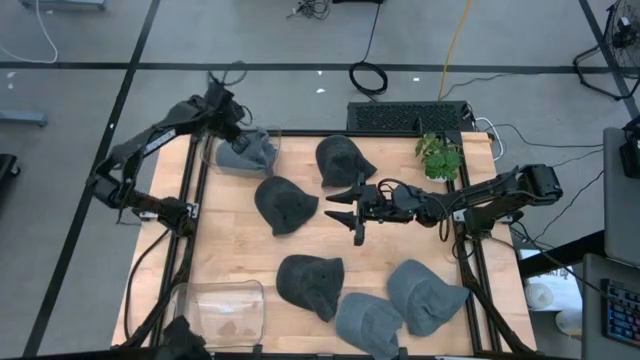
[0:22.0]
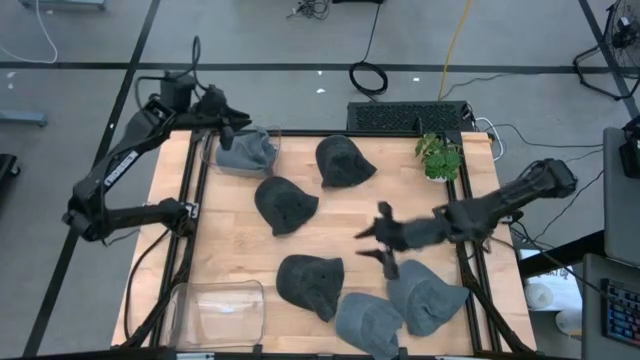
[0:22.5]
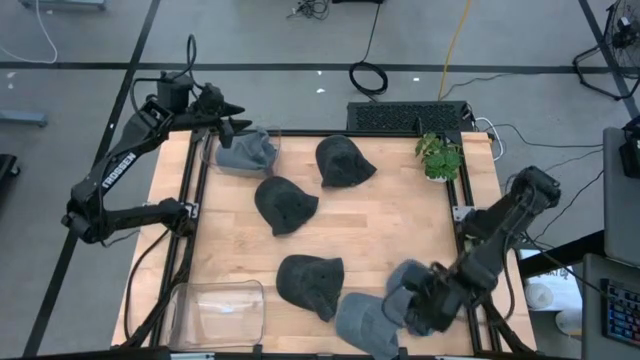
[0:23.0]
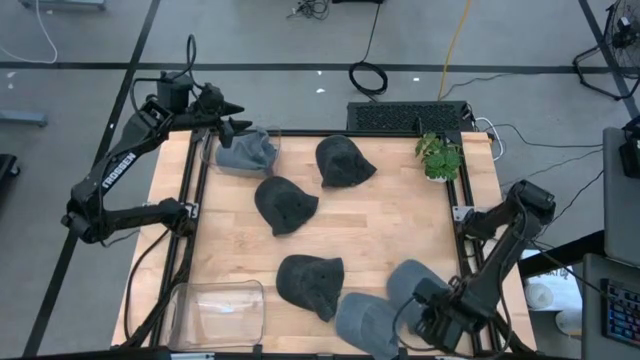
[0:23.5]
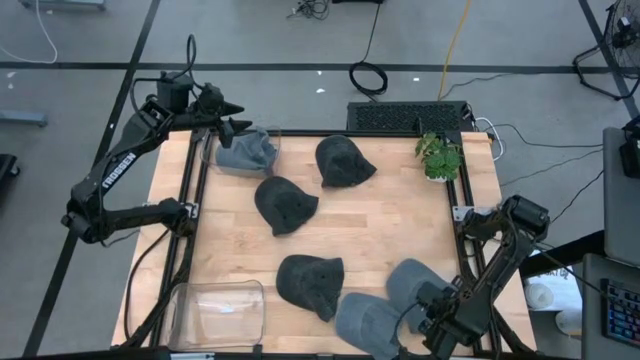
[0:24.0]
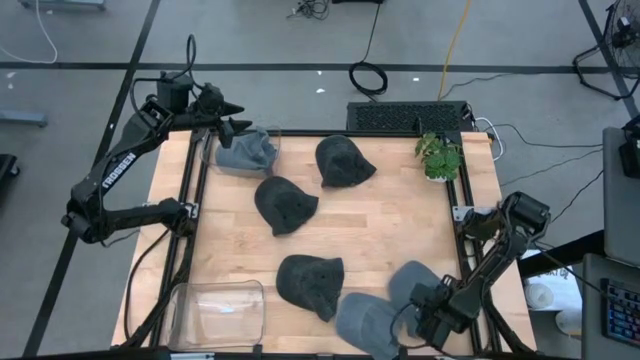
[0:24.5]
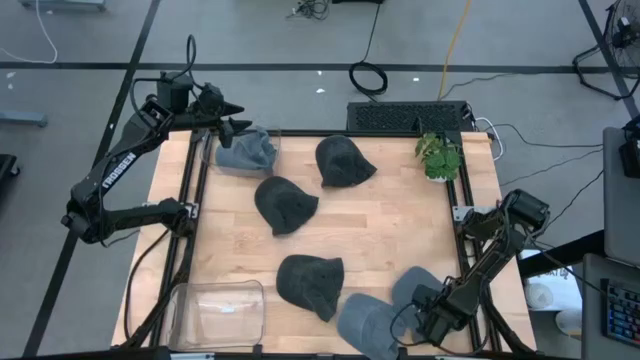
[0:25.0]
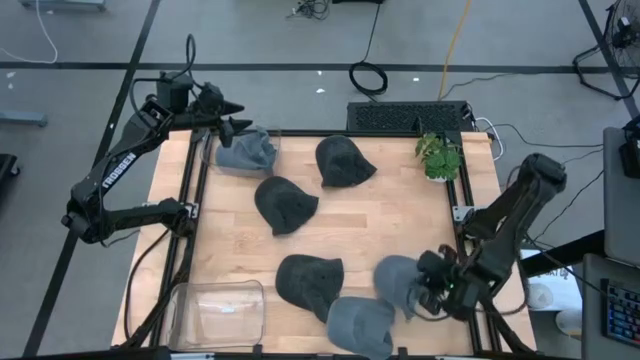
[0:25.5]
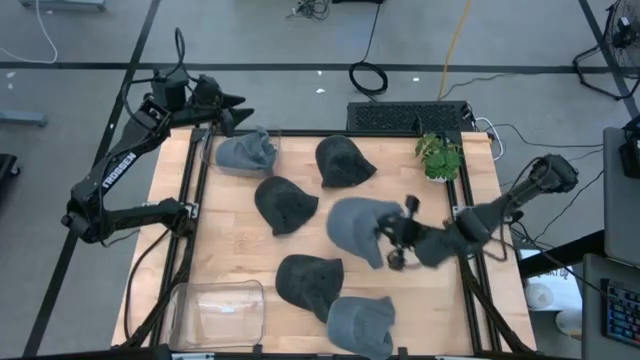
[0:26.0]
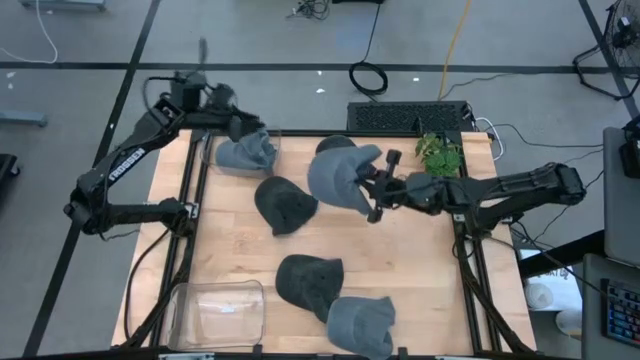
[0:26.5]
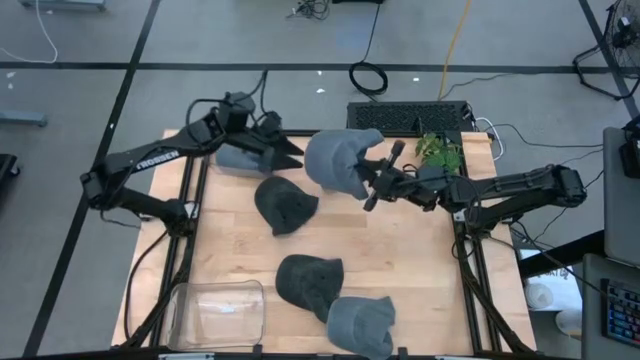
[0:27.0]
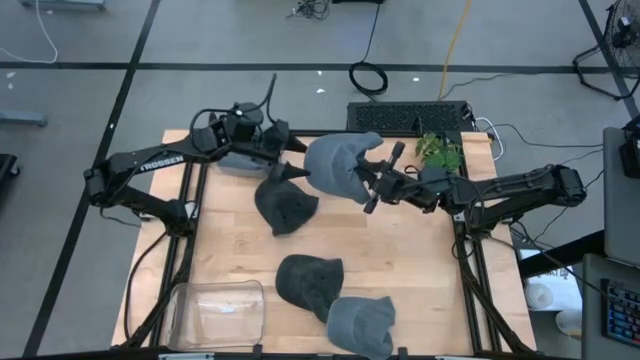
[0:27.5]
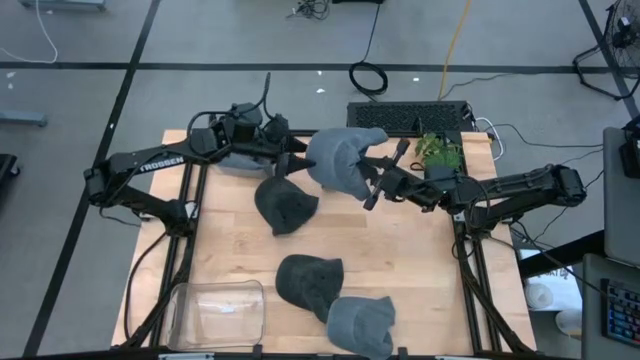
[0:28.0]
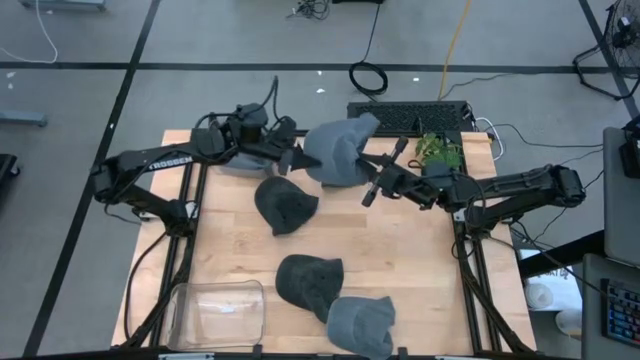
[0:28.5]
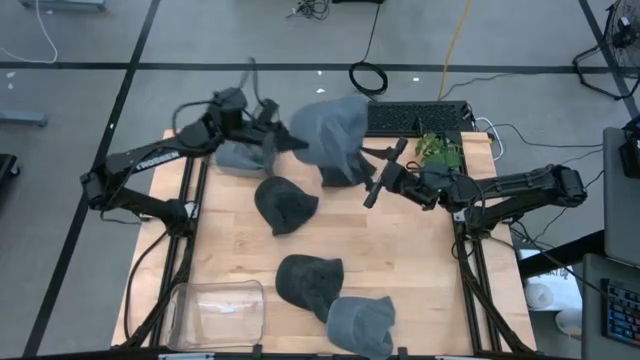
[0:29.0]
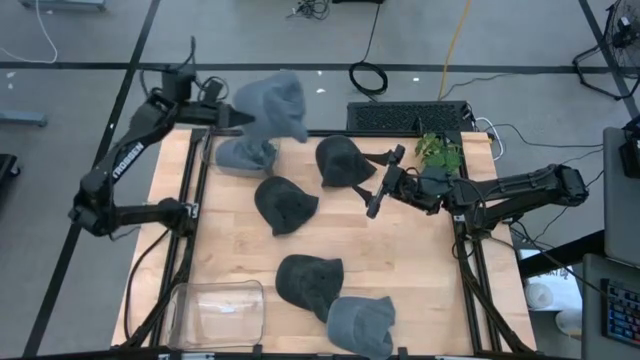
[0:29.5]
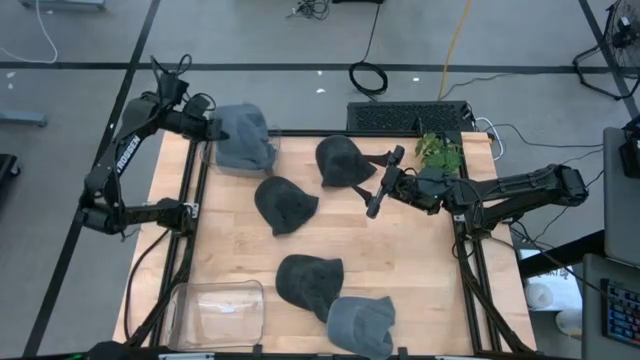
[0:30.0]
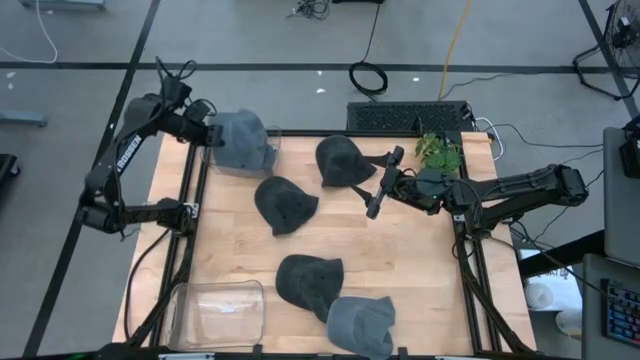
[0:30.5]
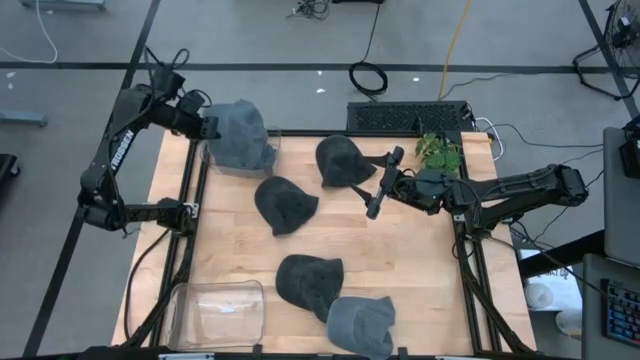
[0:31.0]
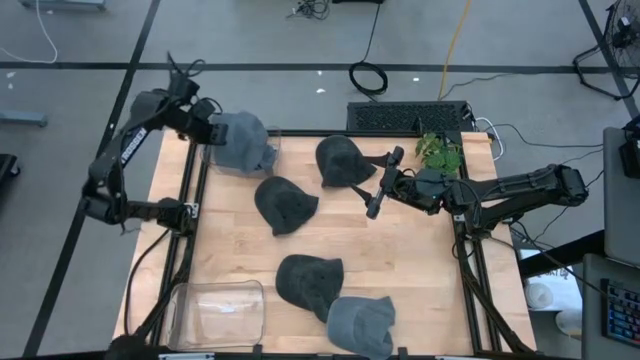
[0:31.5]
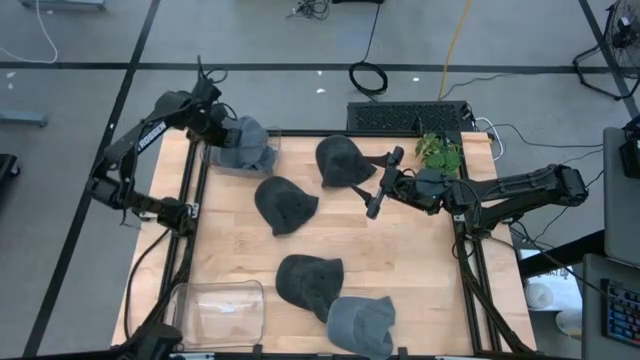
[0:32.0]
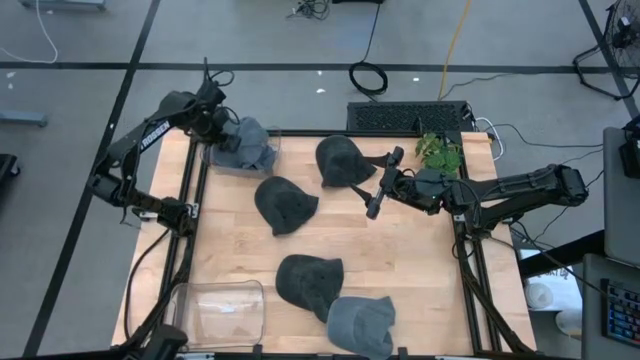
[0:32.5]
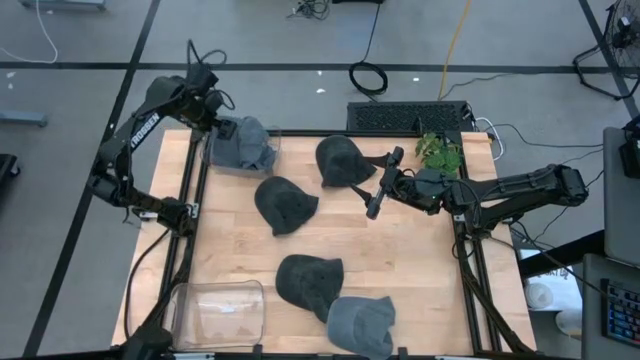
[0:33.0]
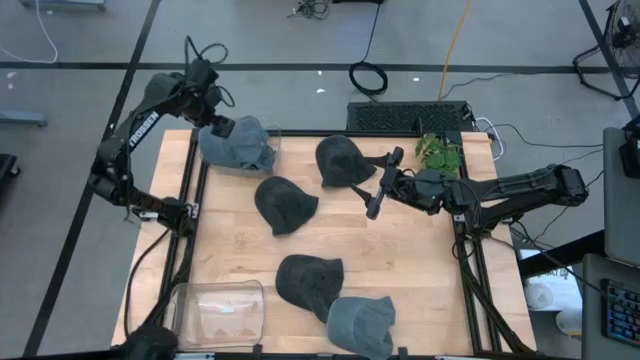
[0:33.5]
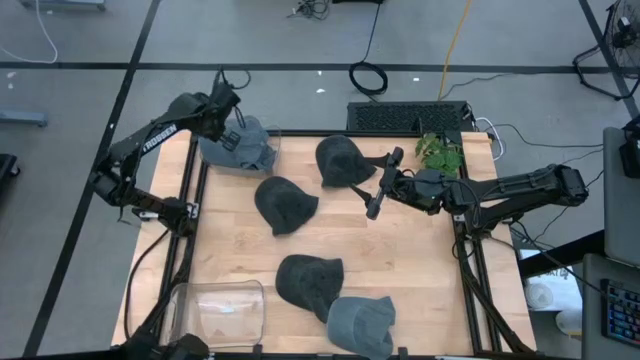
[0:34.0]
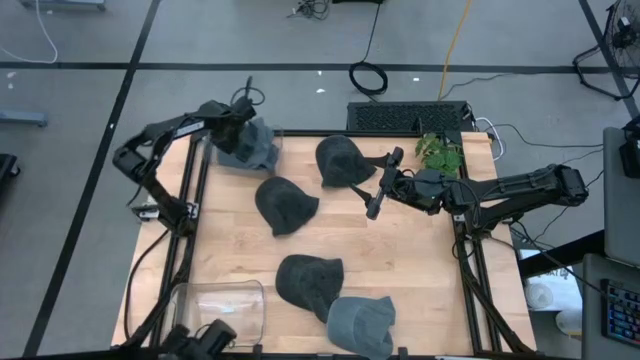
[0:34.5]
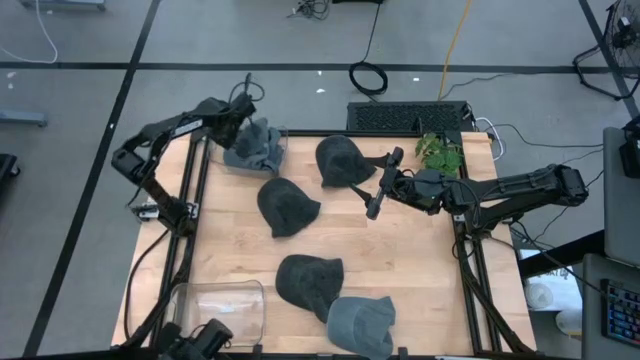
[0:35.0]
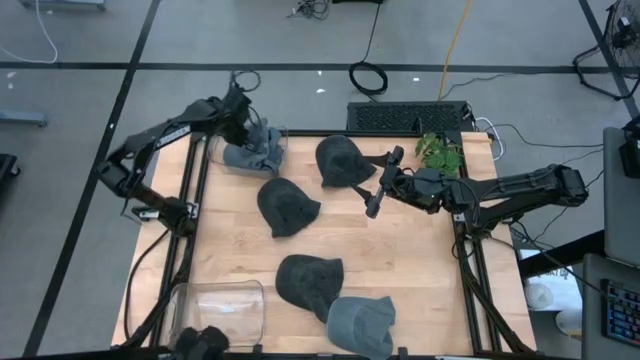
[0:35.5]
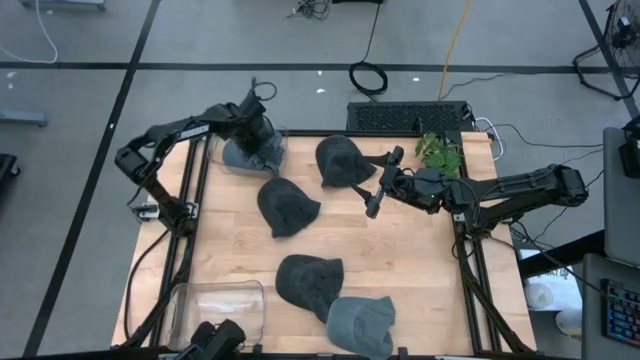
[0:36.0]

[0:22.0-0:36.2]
Task: Pick & Place hat
Put the right gray cap into the top transparent bin

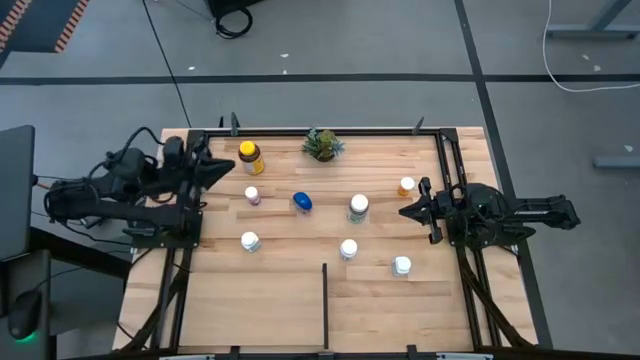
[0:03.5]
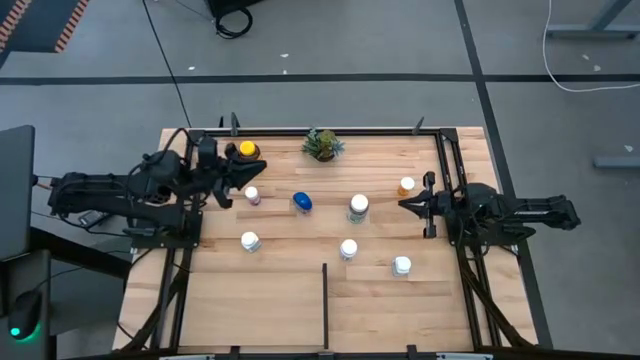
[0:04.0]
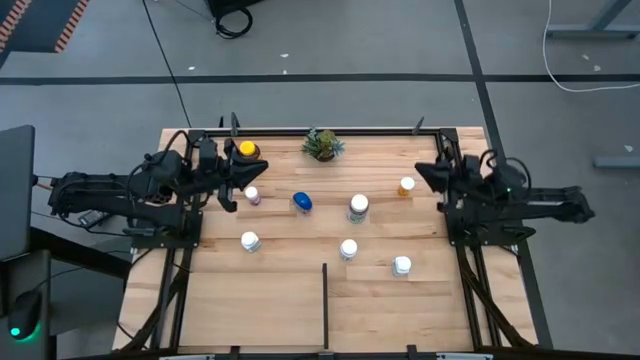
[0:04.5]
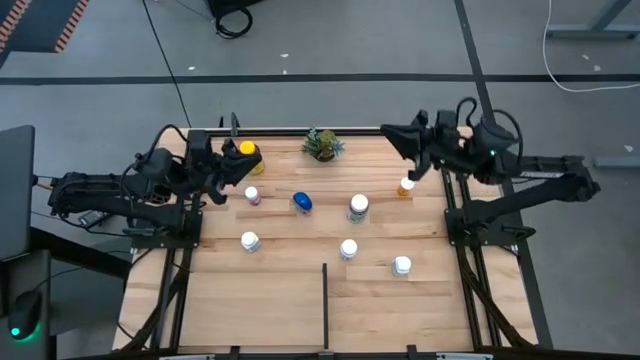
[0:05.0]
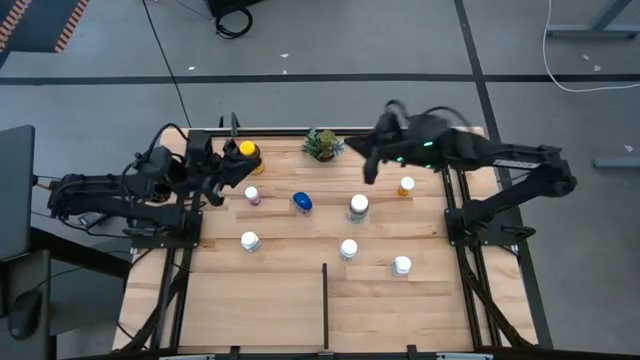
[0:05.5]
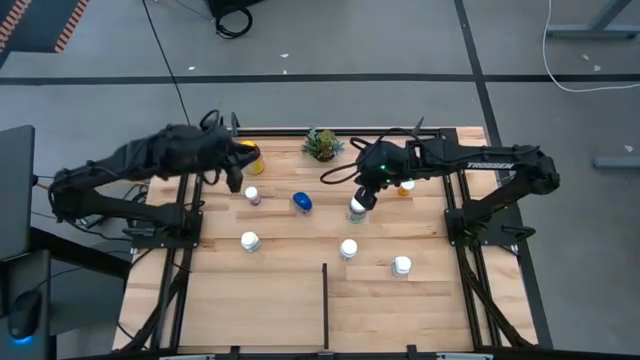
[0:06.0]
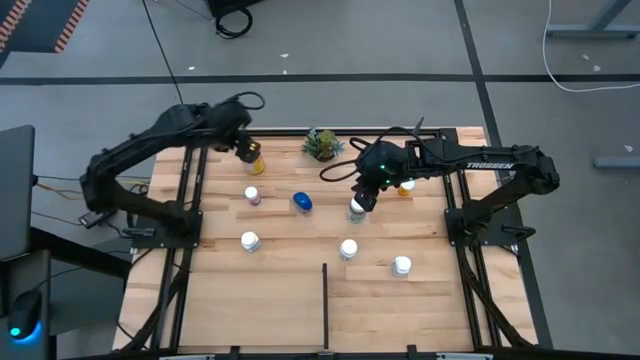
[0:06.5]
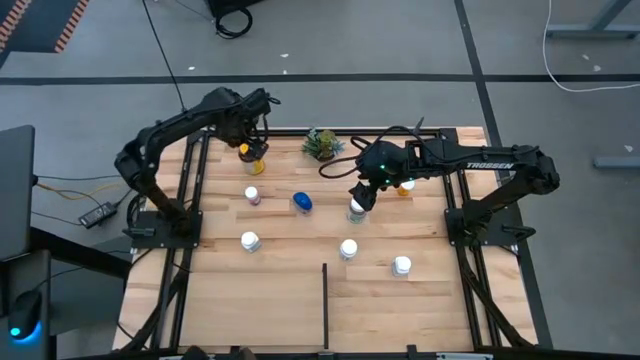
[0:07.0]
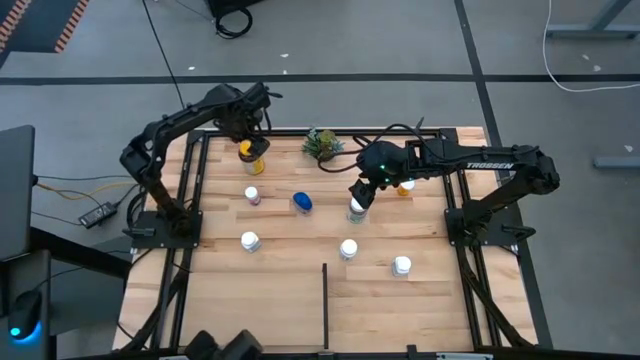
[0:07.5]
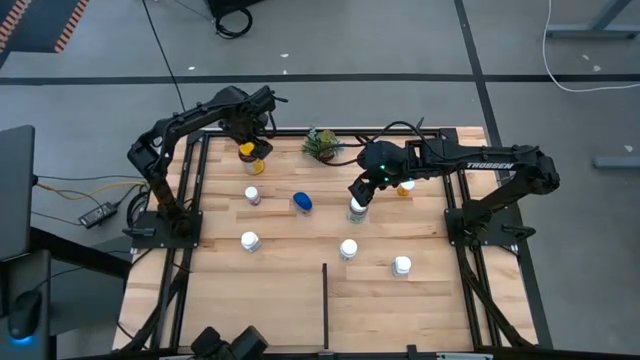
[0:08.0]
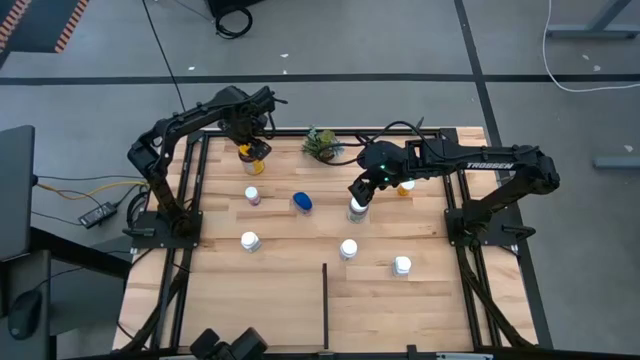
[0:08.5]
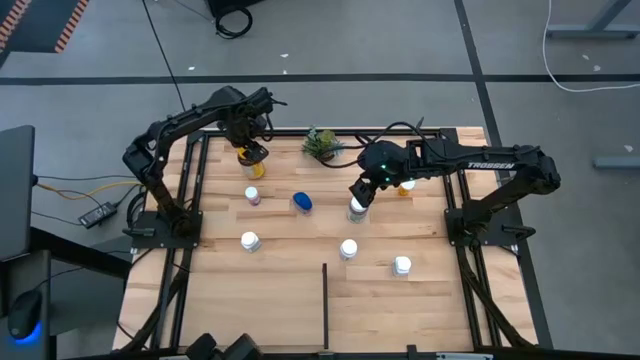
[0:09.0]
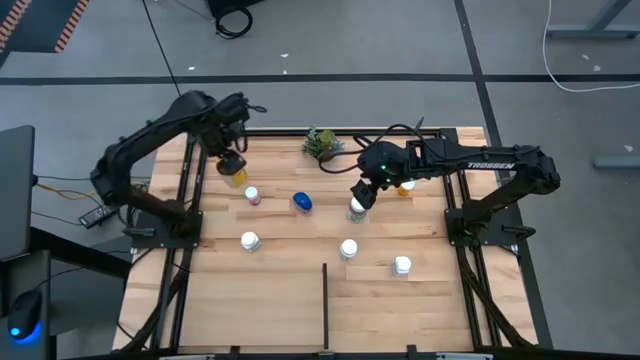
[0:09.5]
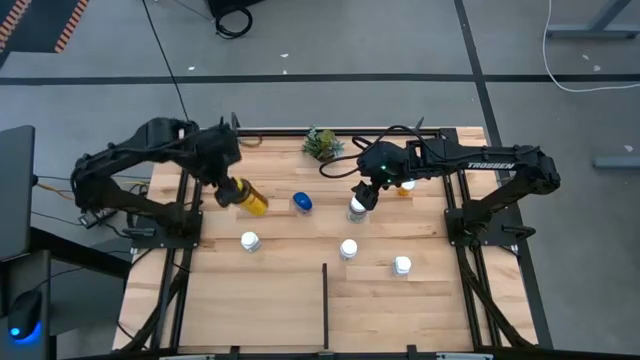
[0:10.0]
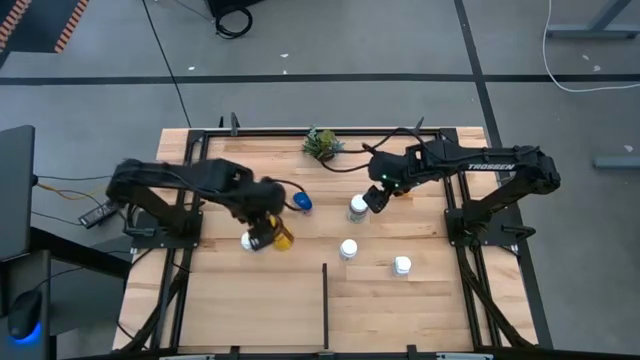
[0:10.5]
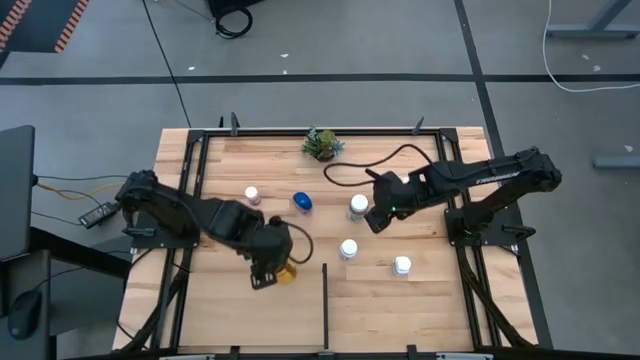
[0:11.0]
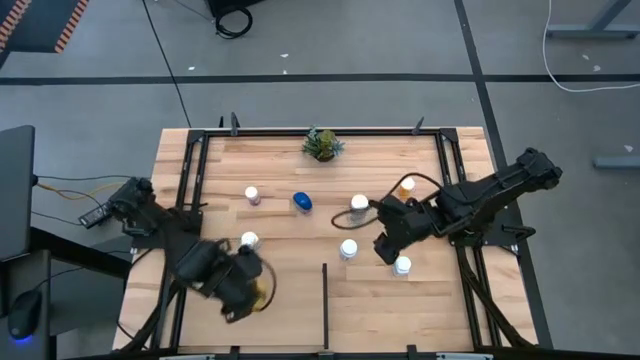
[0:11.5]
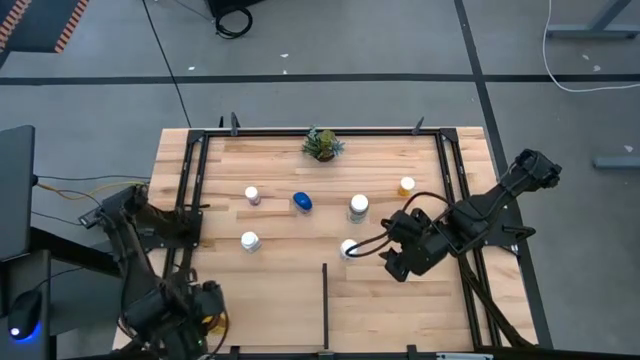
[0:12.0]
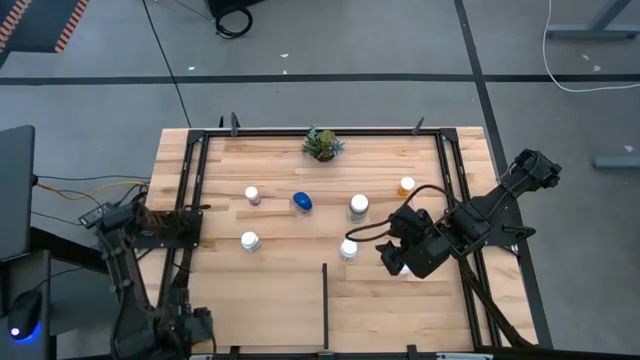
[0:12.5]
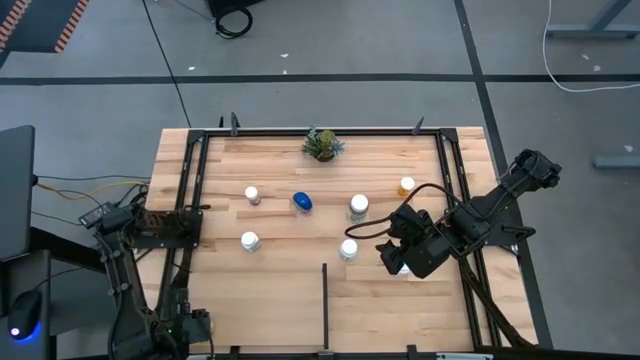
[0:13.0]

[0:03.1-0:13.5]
Task: Pick and place medicine bottles onto shelf by color
Put the yellow medicine bottle on the shelf
